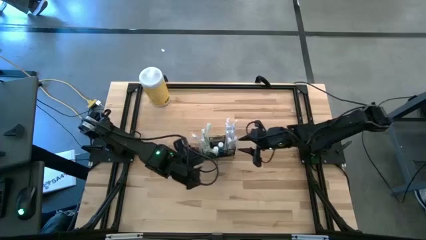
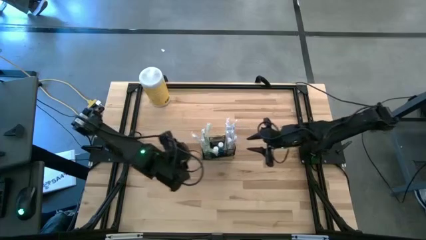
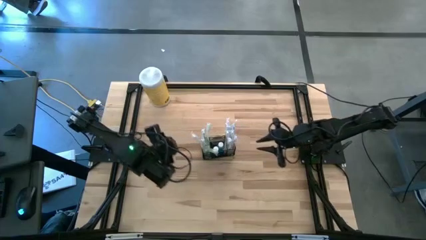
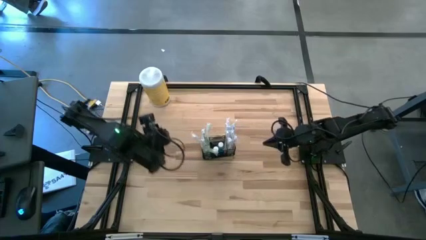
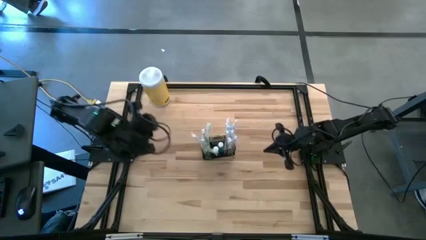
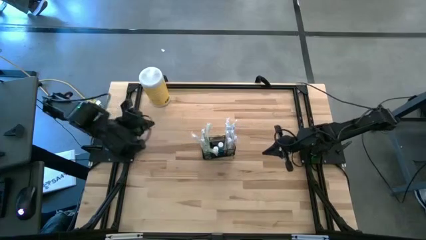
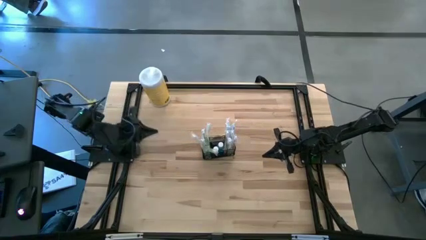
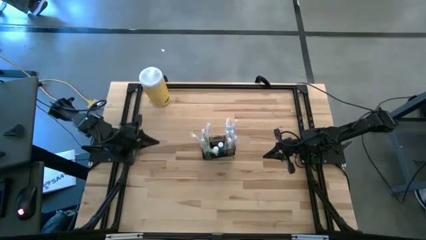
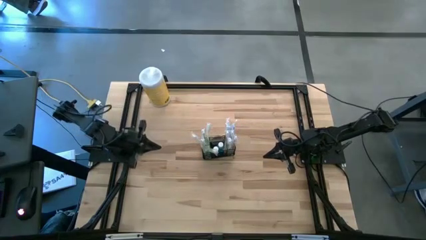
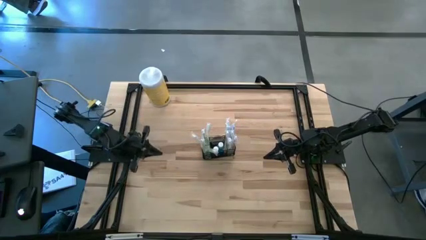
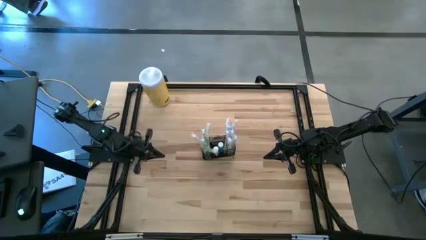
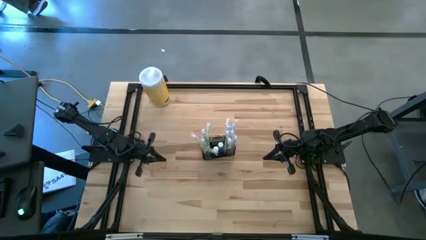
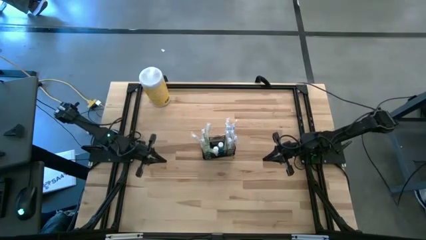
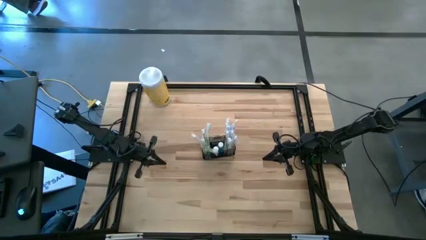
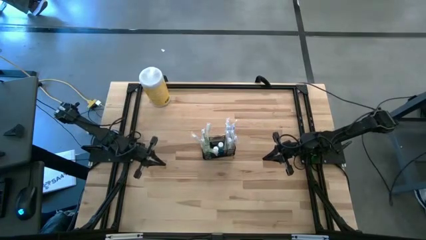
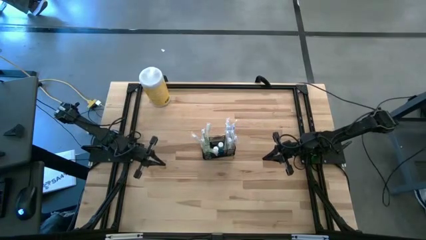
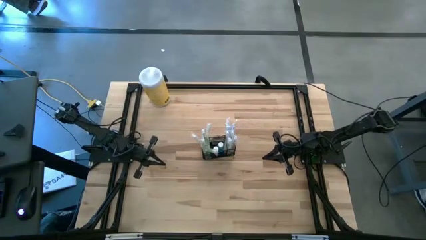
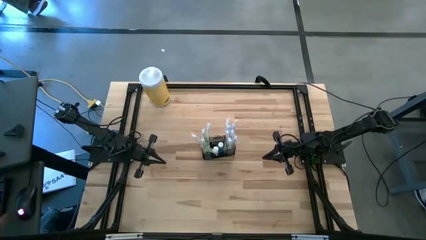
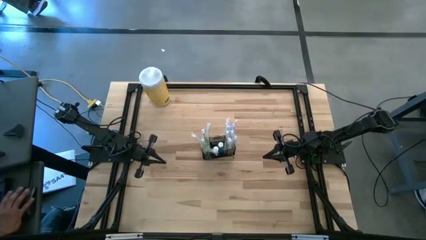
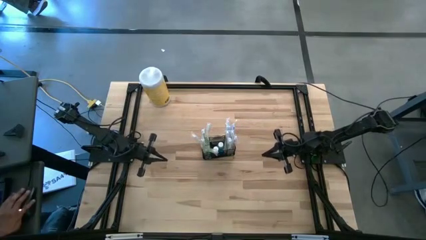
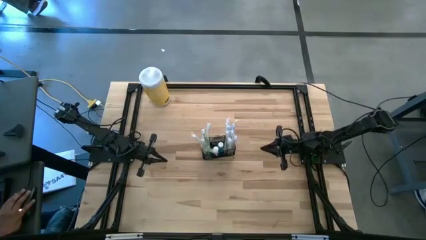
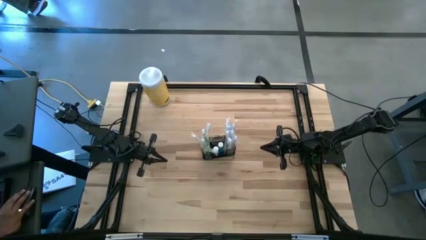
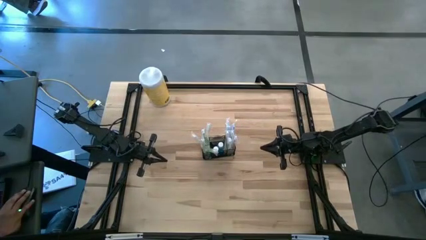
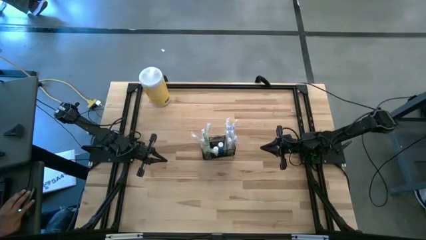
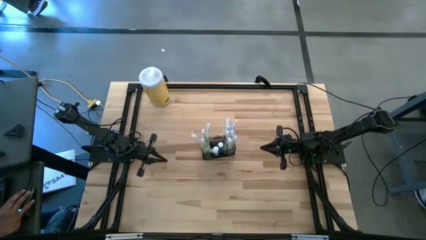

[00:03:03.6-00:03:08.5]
Task: Pick & Place toothbrushing station
Return to Home Position

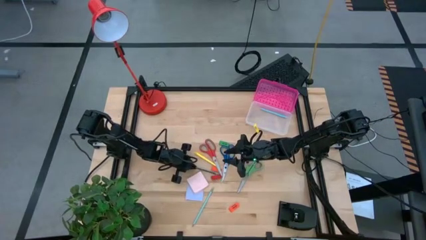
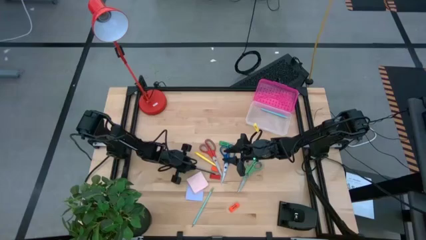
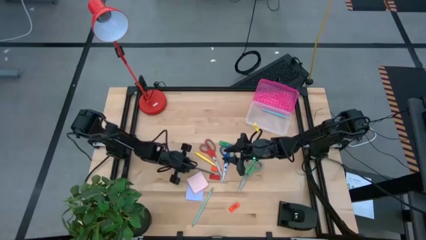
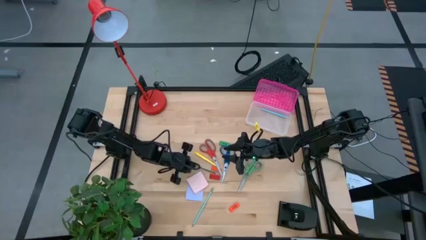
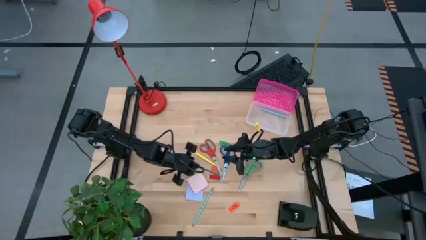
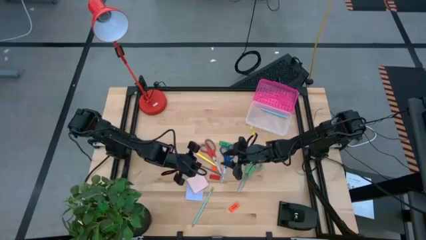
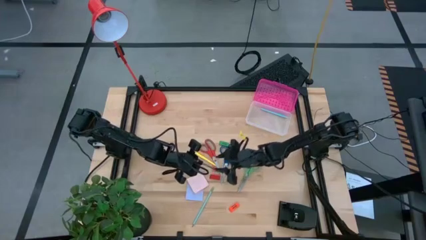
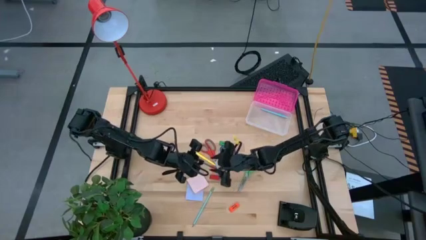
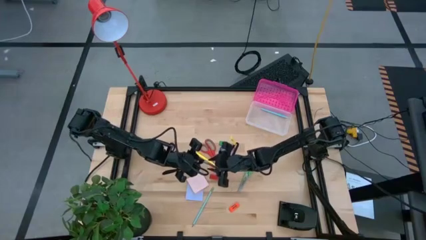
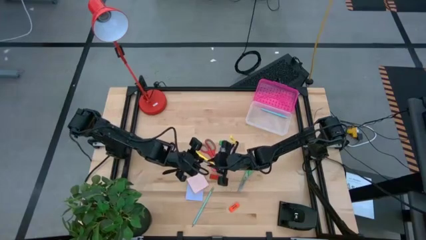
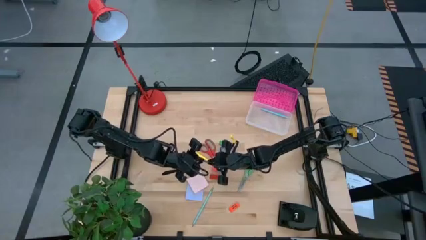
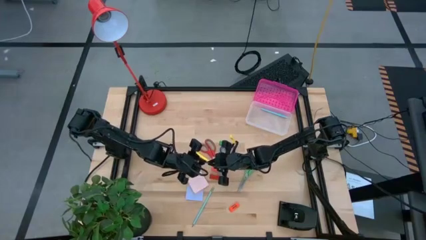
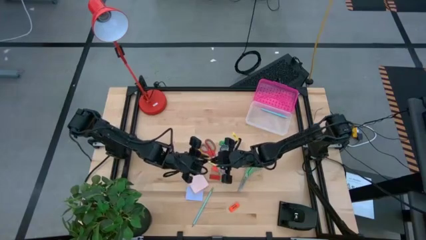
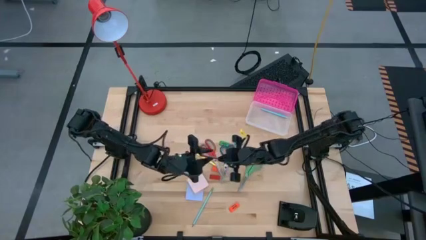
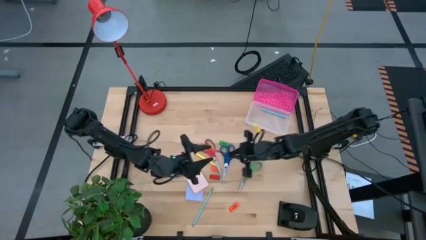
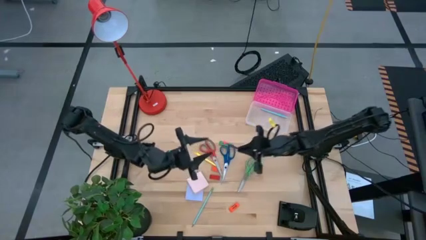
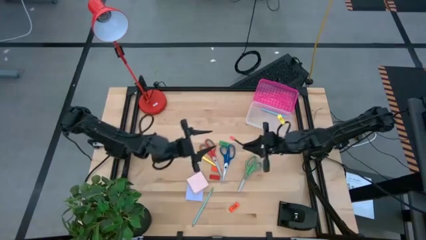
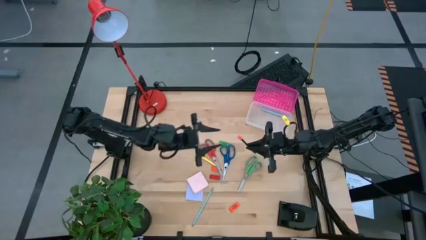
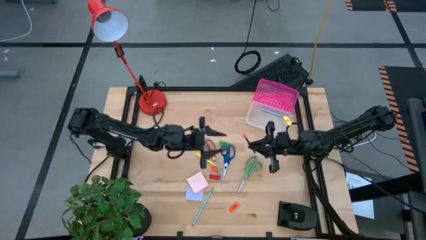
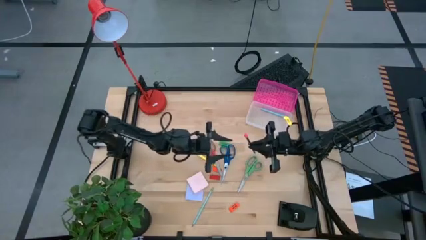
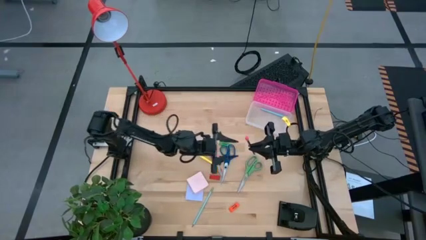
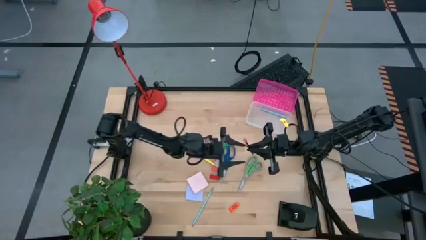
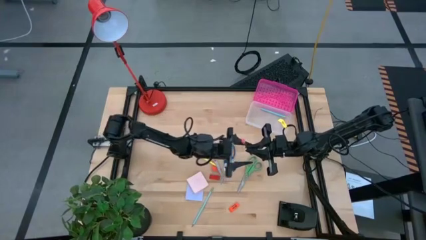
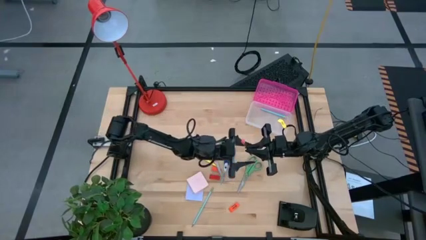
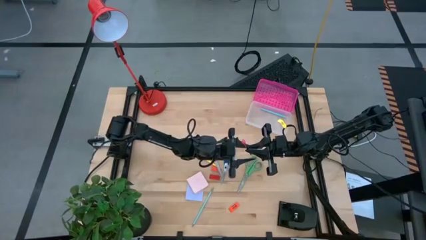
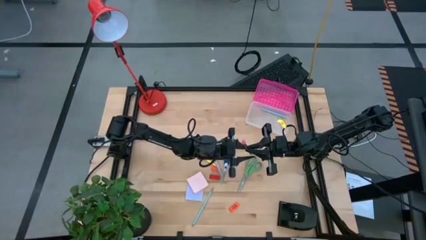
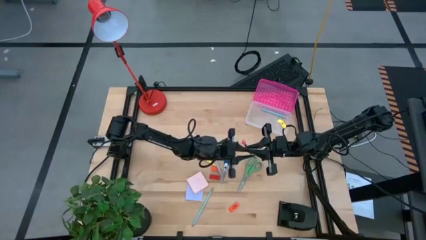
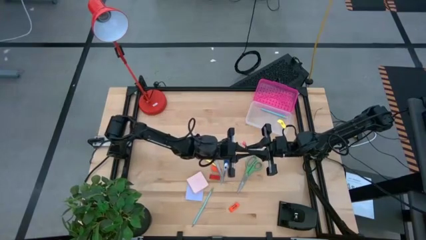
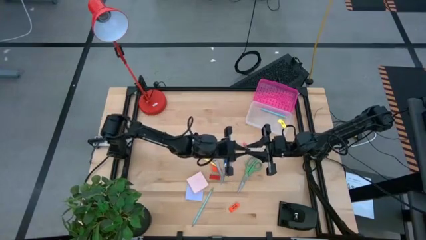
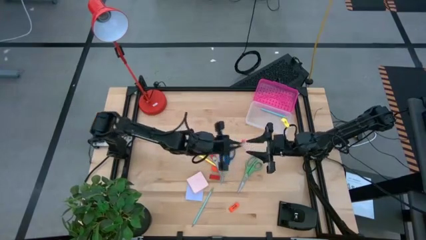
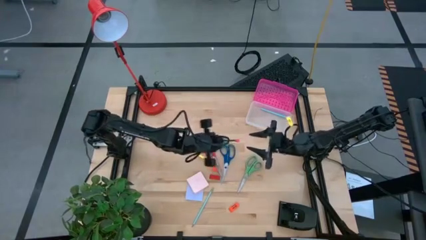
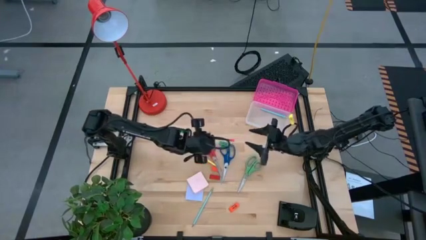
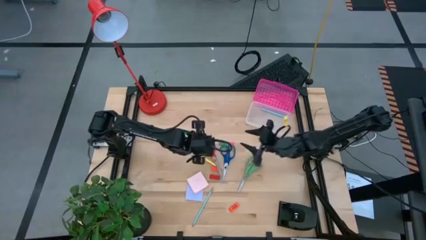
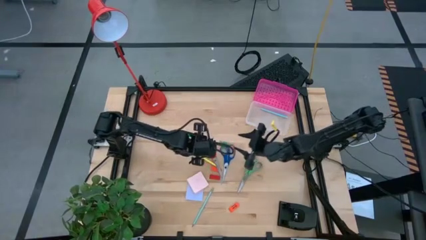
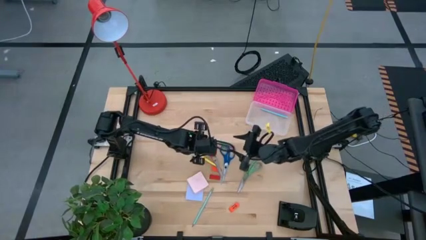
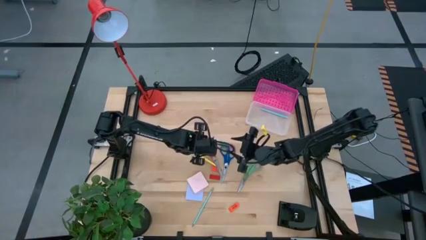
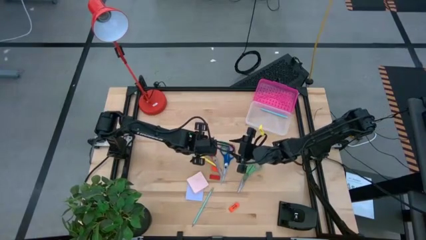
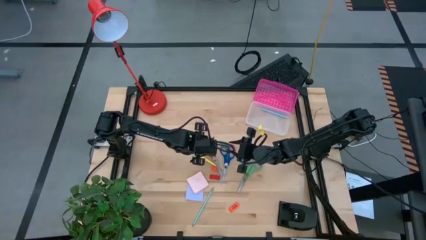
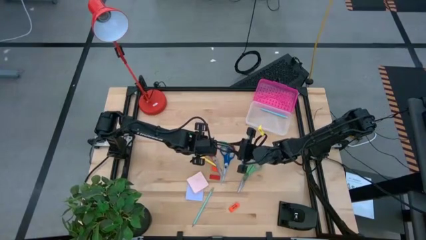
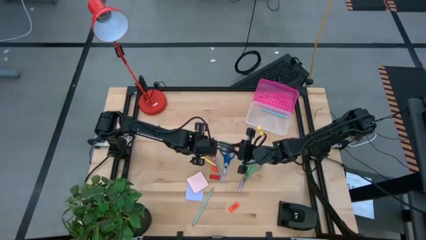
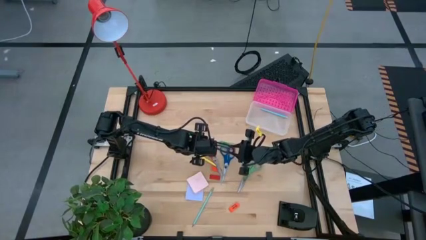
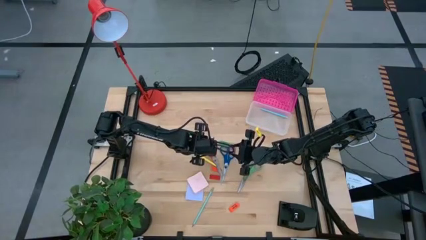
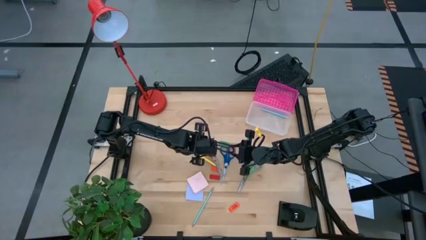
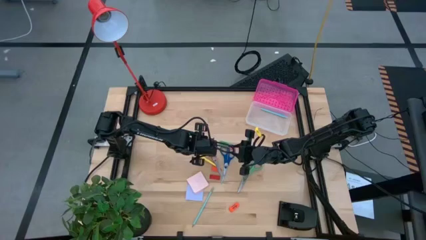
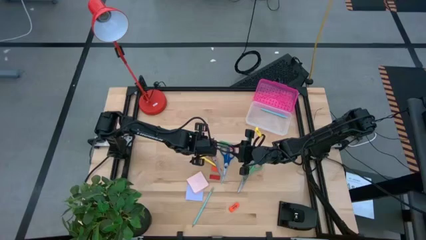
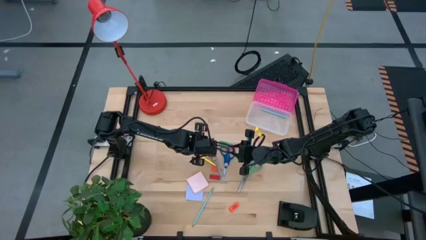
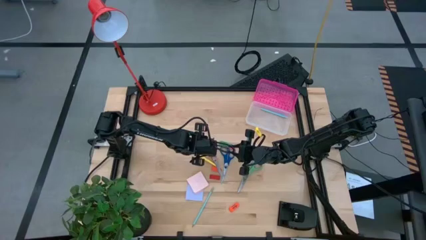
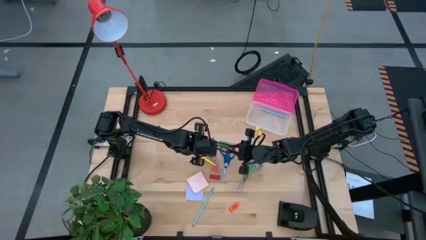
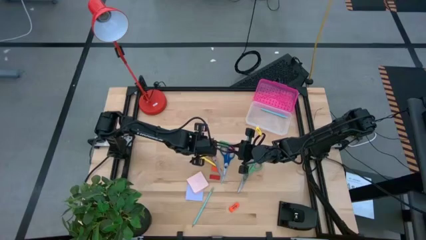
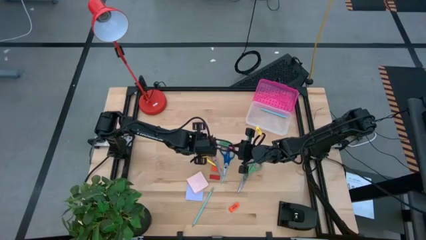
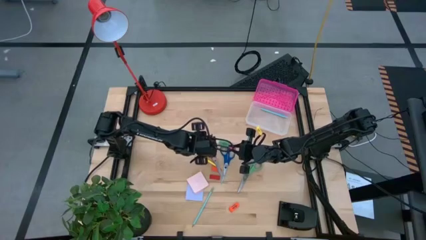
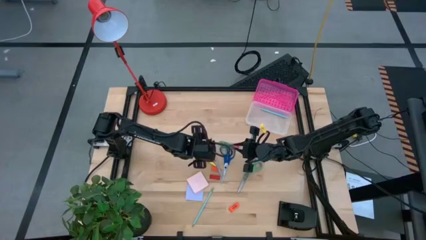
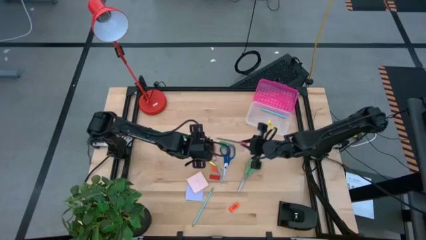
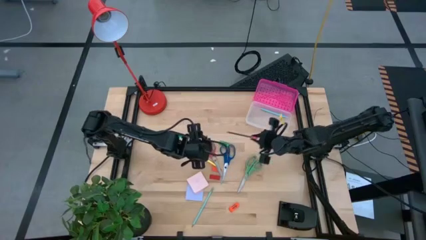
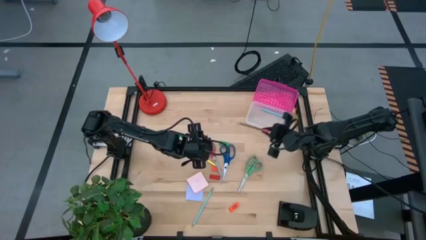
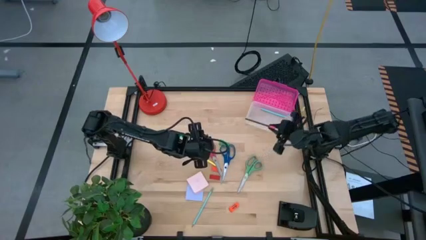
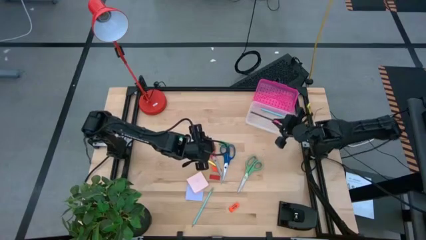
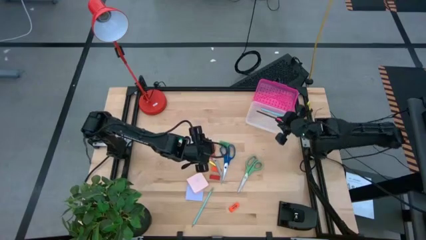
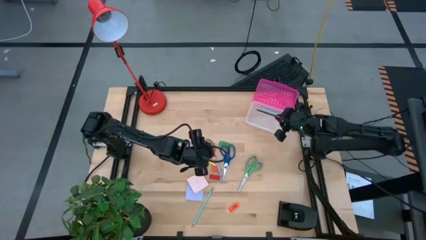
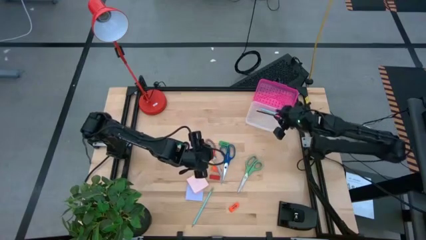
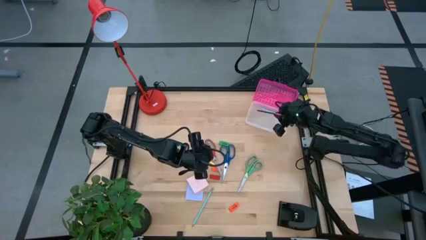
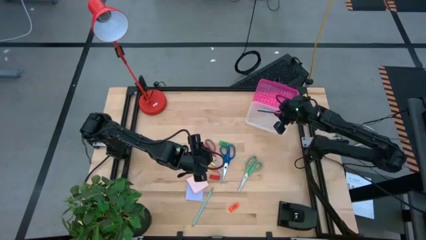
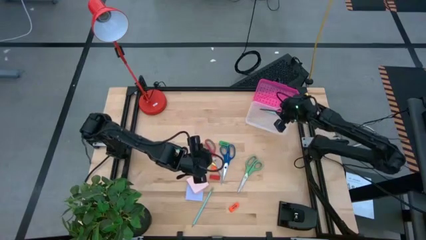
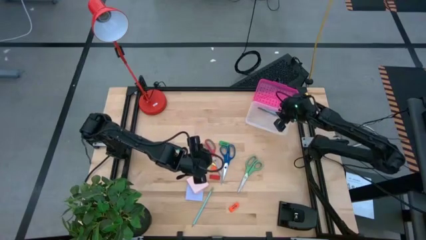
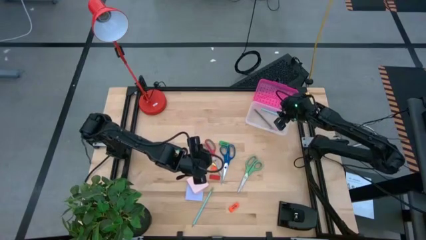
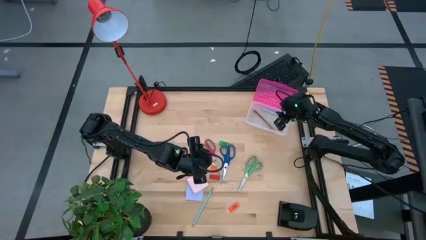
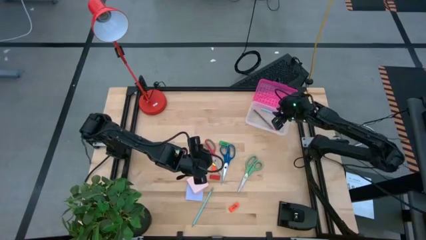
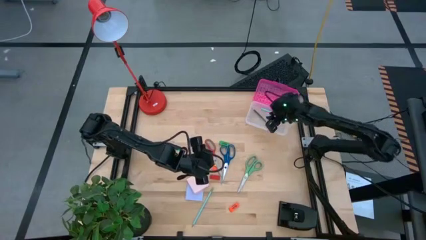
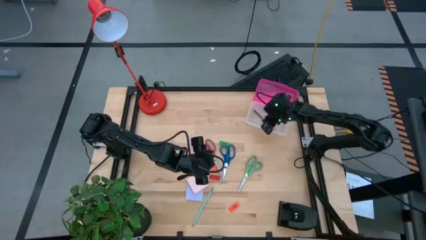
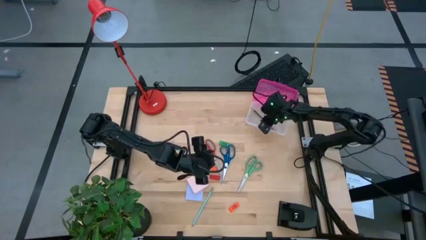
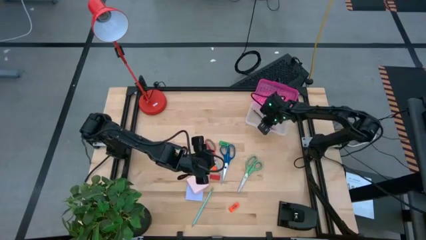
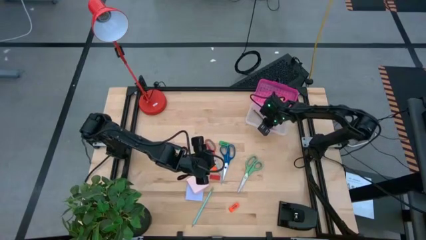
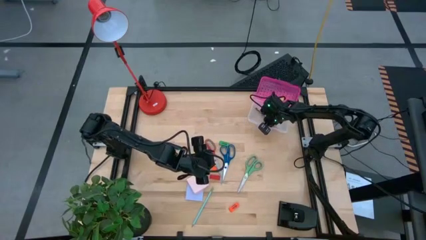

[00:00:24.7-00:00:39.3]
Task: Pack school essentials
Put the blue pencil into the supply box
